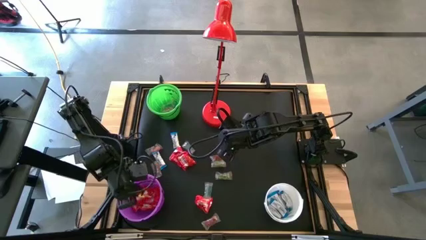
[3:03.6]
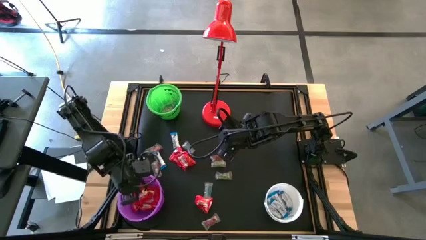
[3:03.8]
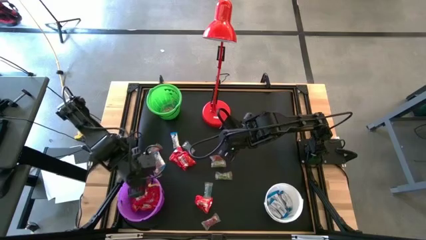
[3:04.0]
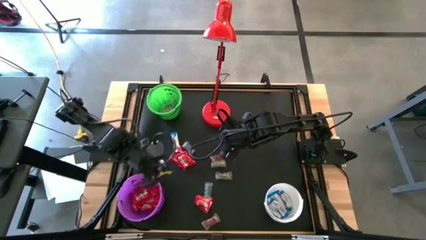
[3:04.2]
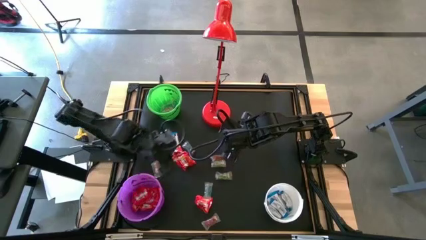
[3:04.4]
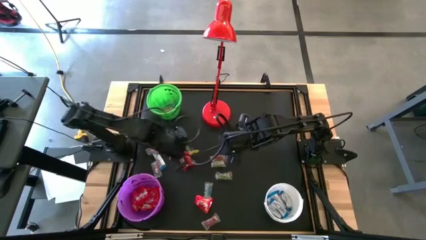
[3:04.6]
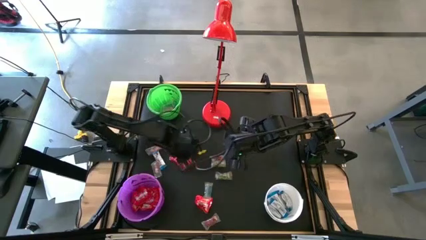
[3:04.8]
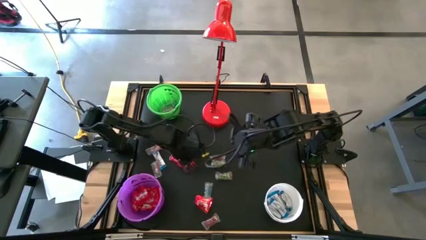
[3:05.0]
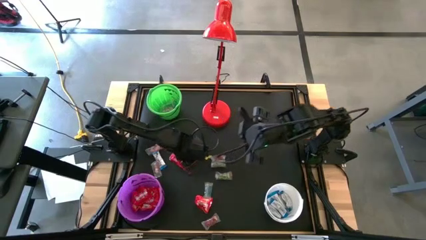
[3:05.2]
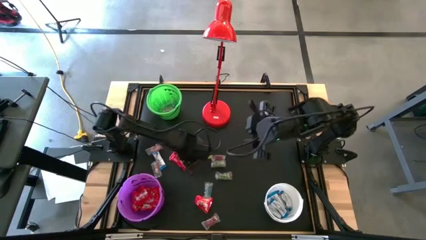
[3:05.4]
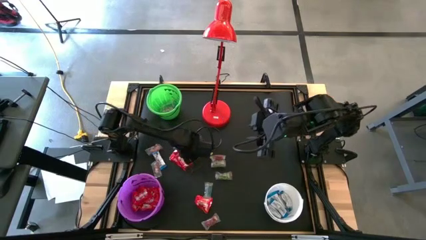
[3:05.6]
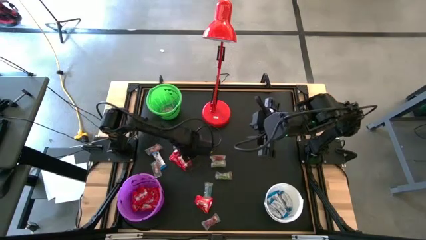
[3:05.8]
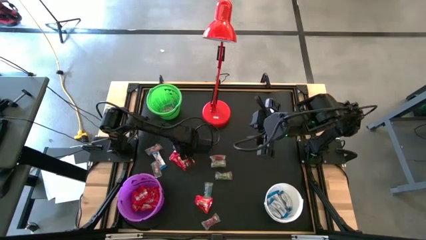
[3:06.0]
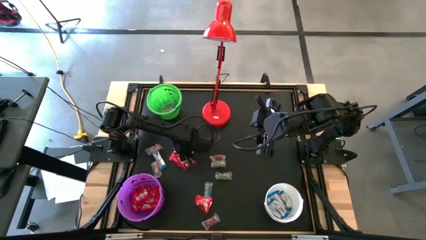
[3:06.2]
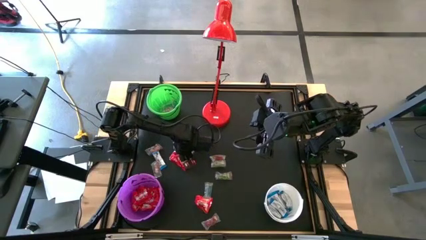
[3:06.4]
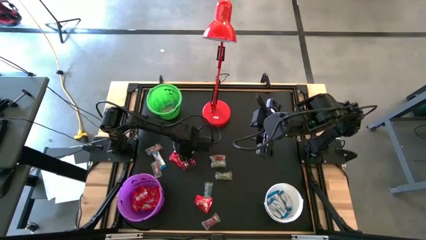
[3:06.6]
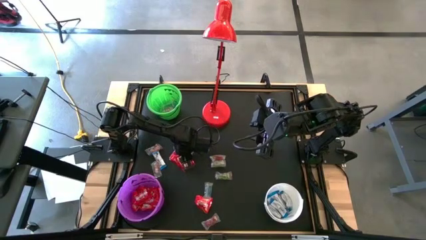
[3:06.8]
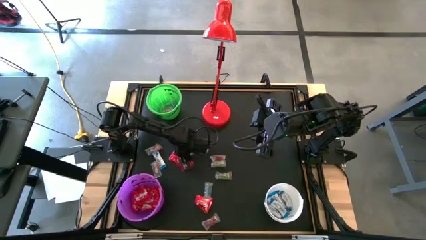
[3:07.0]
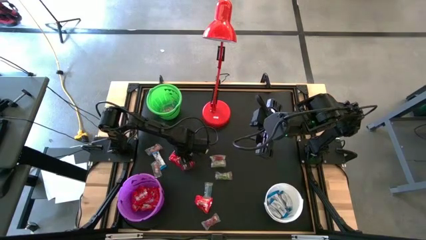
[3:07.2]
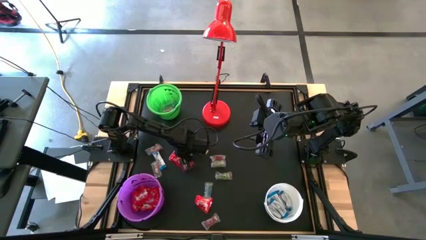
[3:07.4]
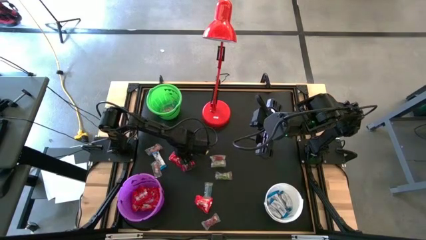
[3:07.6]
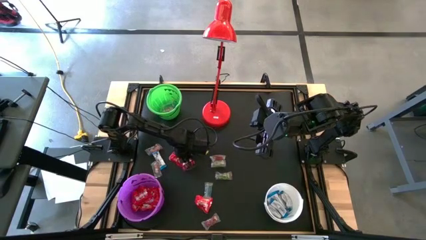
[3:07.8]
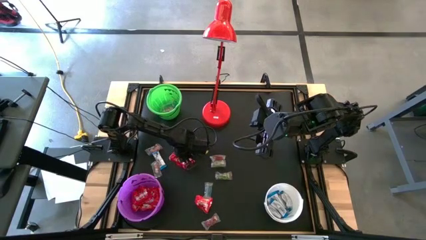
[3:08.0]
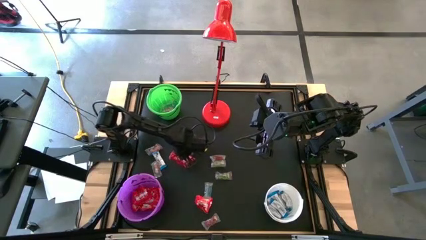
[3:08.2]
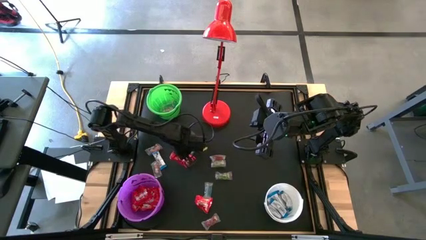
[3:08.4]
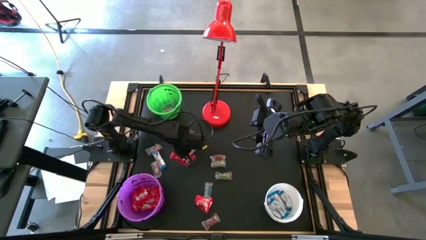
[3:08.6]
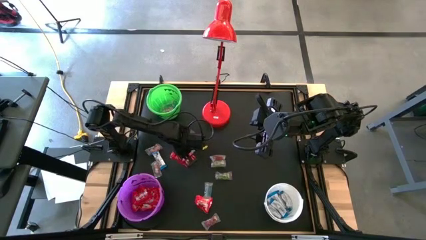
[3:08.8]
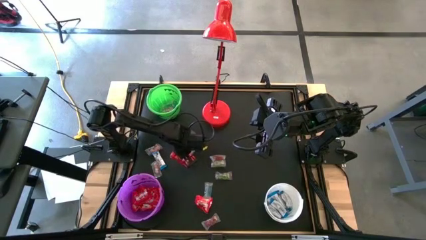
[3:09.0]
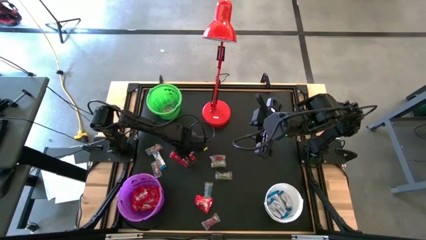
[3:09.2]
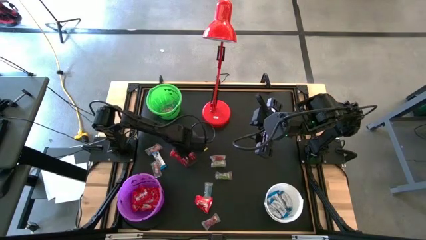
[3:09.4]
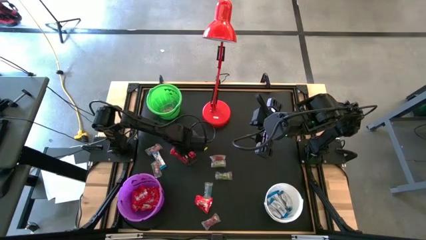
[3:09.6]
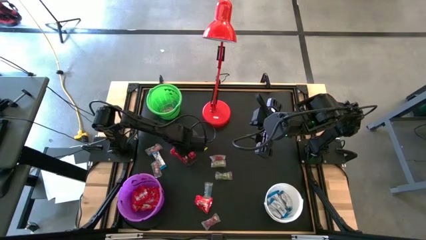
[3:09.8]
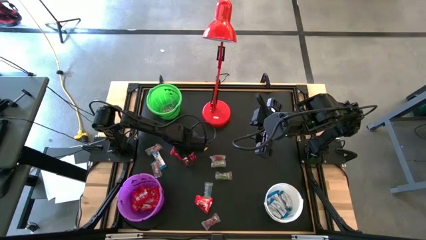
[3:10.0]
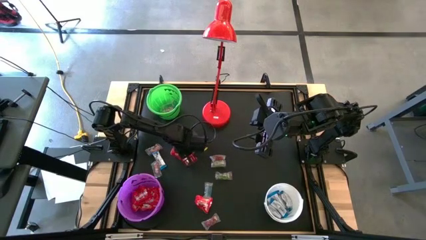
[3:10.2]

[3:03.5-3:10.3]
Task: Sort candy
Put the red candy into the purple bucket

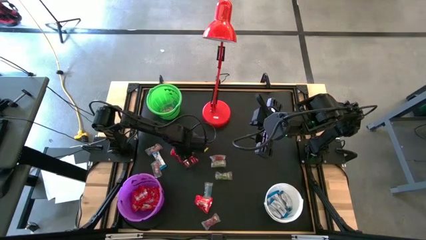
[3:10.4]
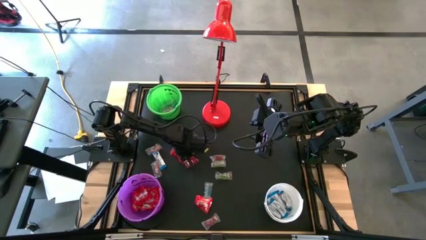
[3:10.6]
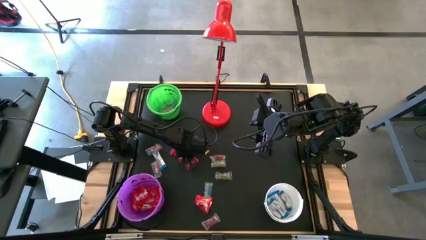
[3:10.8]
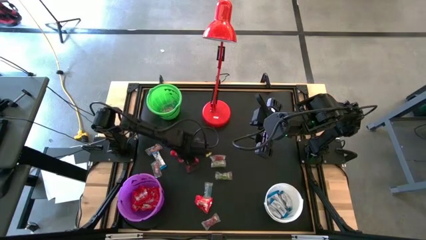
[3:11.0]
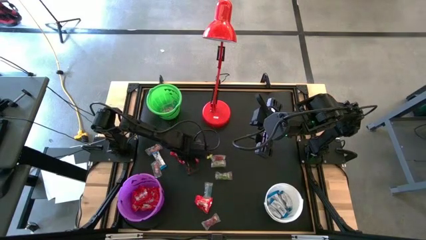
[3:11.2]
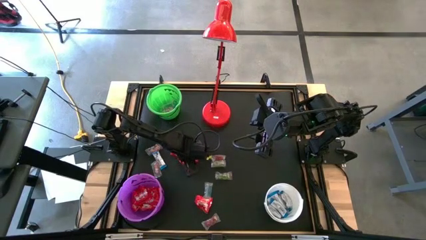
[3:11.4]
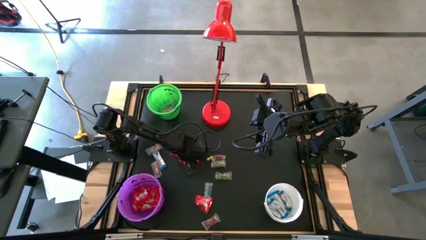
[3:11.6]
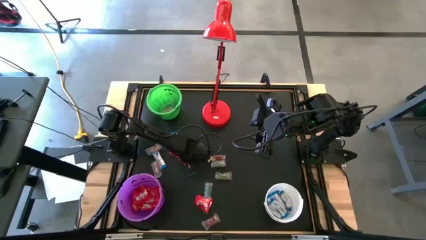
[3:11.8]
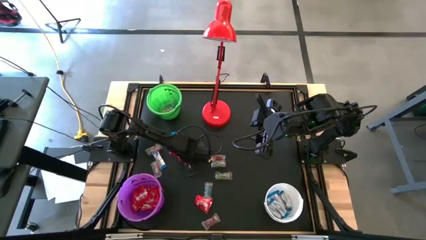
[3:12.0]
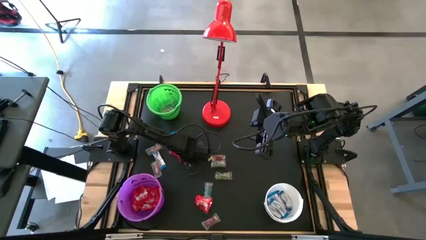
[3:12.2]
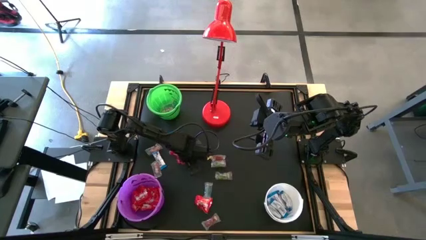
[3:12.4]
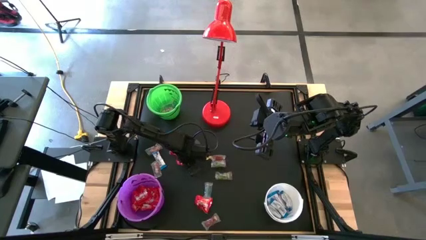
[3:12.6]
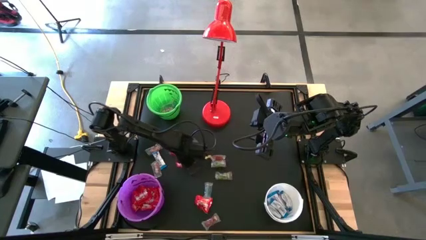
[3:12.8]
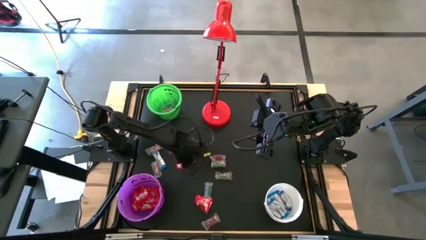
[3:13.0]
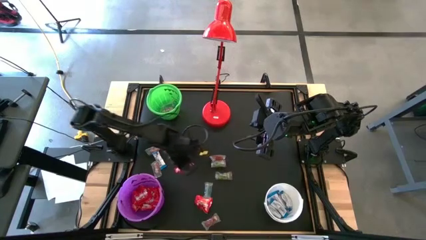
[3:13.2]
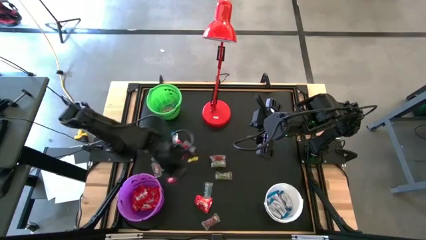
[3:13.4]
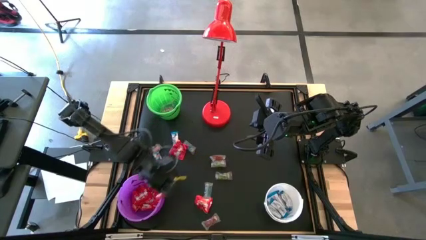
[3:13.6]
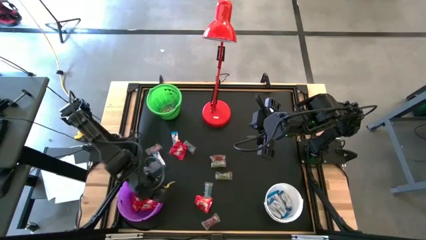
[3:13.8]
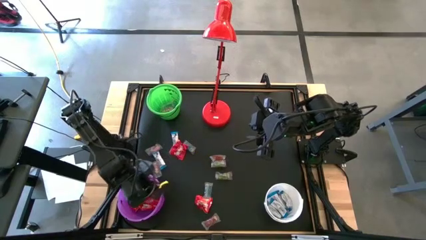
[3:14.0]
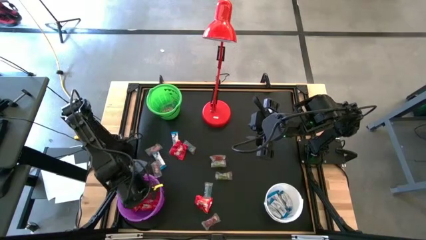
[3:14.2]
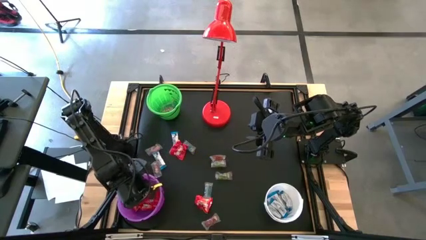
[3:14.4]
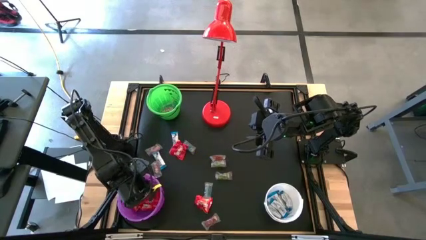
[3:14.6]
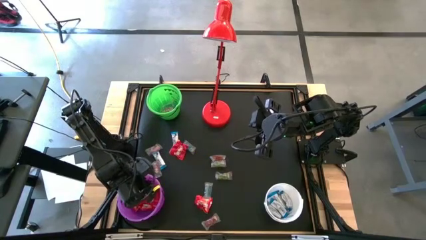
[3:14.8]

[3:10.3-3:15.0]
Put the red candy into the purple bucket

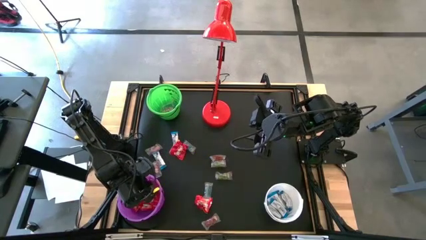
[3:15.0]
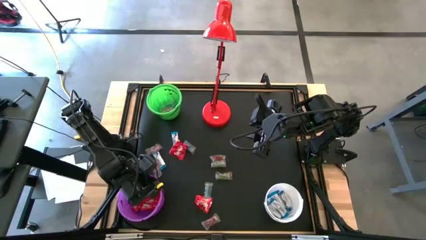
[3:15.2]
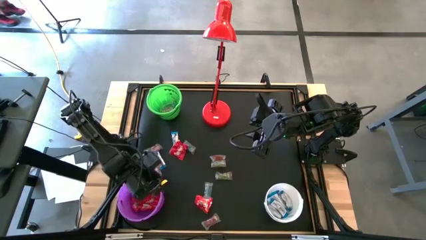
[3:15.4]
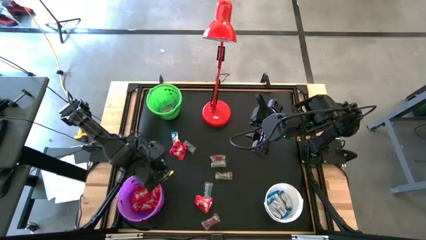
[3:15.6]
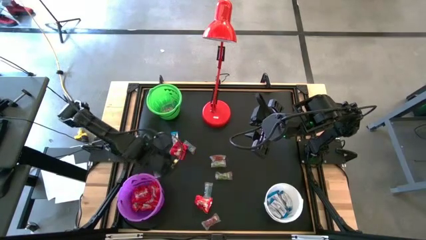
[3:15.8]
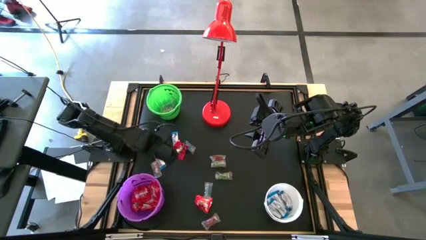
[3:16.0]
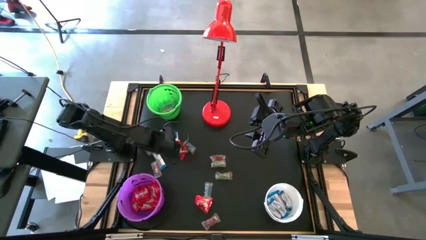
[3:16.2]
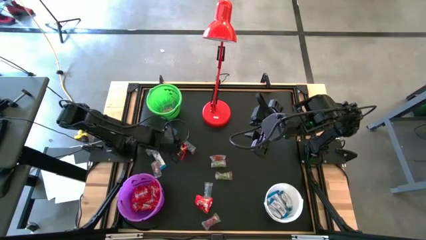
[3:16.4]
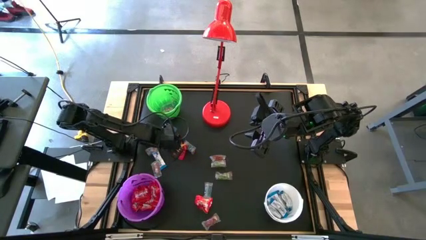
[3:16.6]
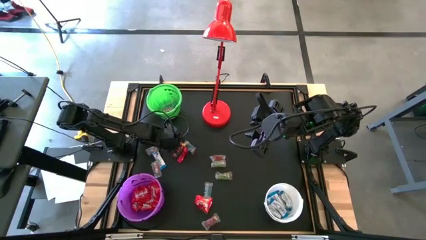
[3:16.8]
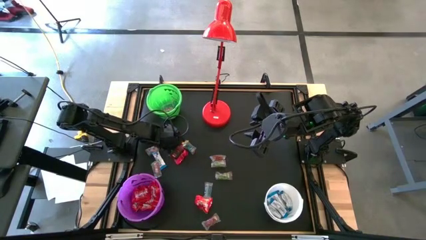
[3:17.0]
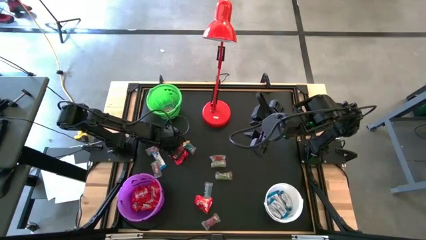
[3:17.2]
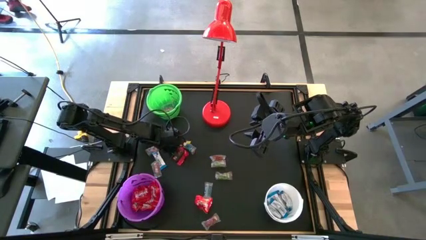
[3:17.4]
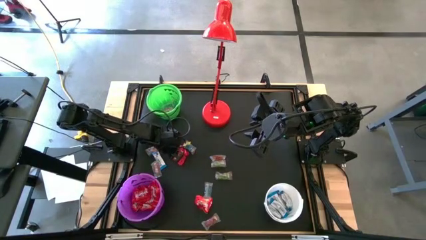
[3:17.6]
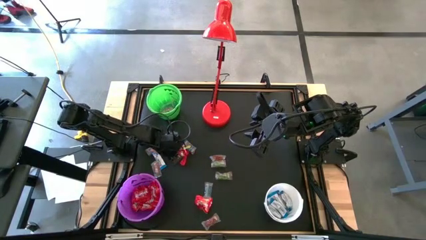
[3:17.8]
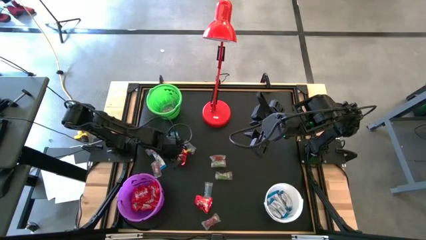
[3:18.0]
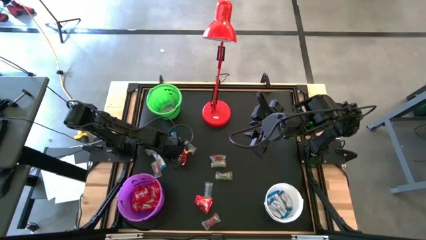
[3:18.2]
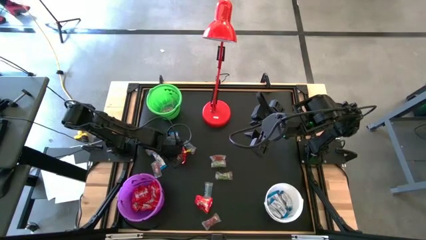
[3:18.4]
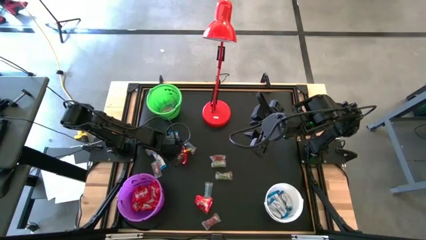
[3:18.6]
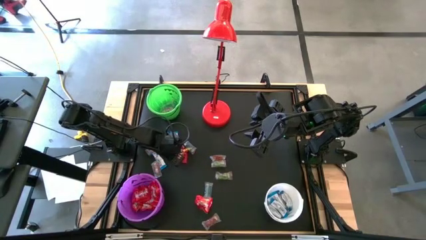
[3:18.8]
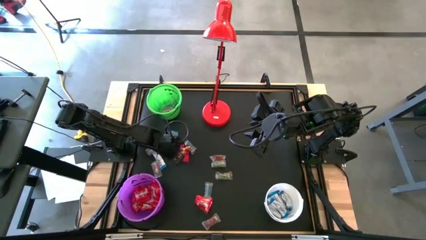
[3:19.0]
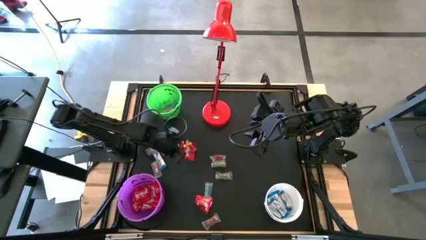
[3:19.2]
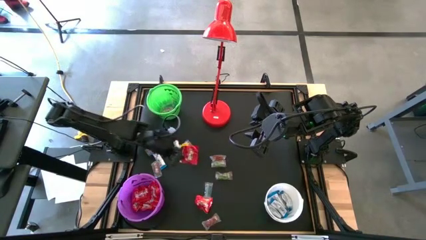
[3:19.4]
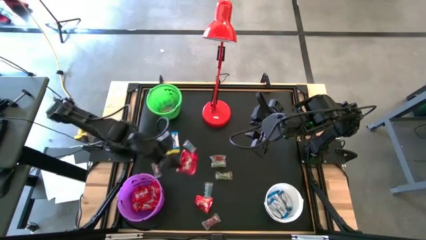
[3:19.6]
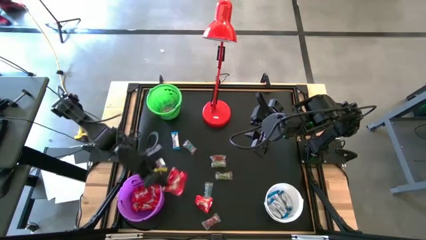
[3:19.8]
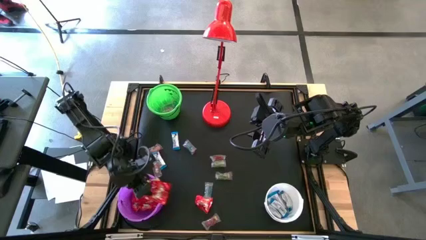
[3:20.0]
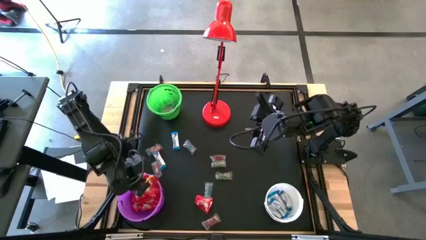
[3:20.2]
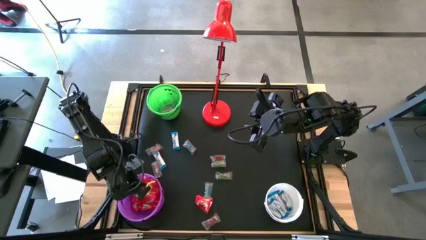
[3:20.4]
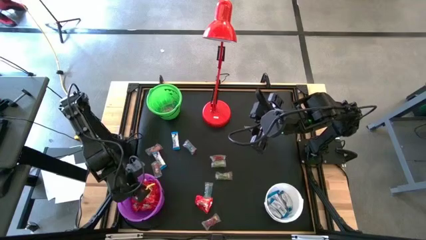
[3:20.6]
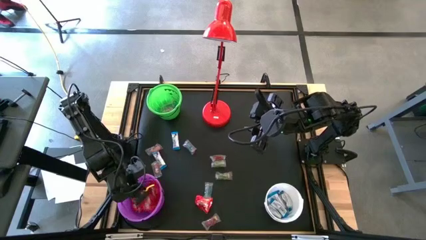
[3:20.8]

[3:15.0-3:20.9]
Put the red candy into the purple bucket
